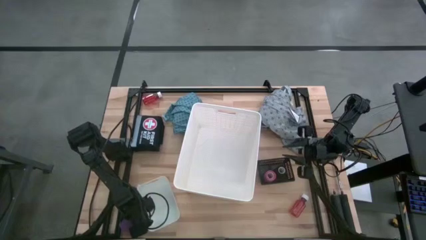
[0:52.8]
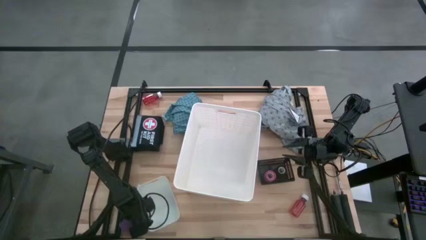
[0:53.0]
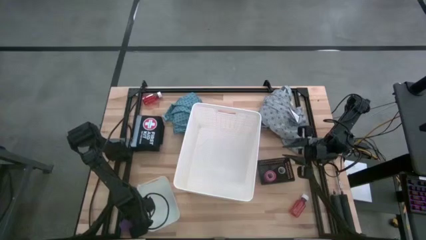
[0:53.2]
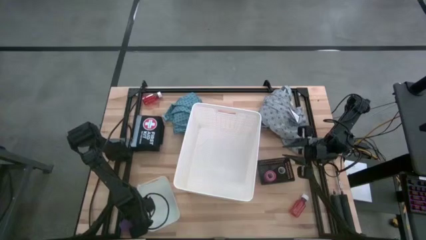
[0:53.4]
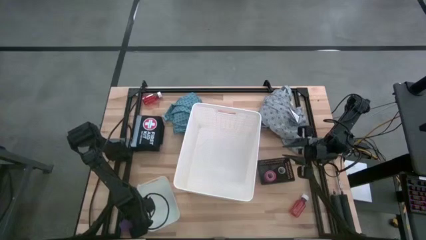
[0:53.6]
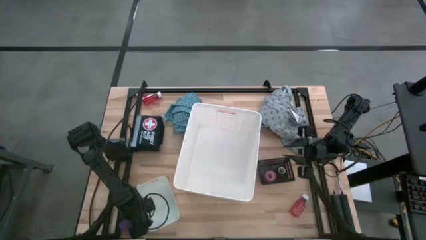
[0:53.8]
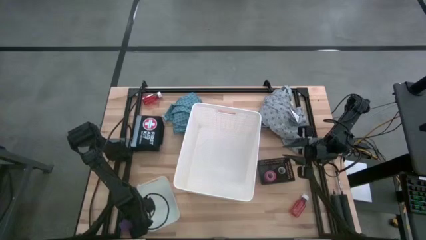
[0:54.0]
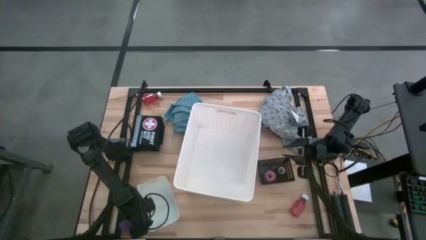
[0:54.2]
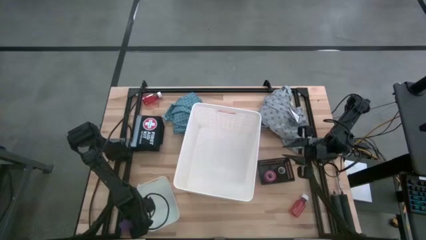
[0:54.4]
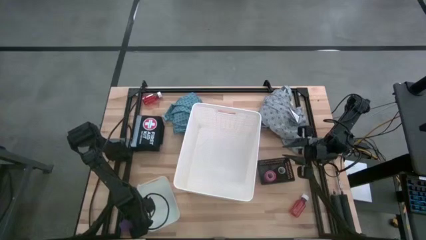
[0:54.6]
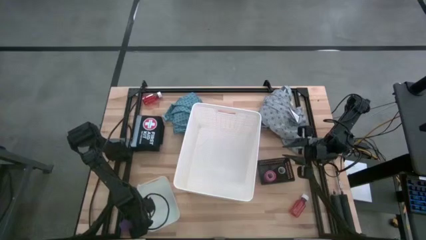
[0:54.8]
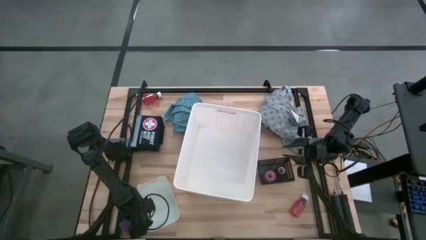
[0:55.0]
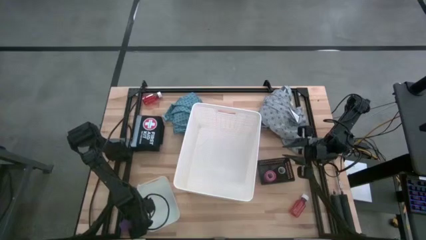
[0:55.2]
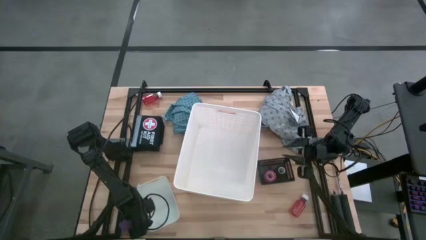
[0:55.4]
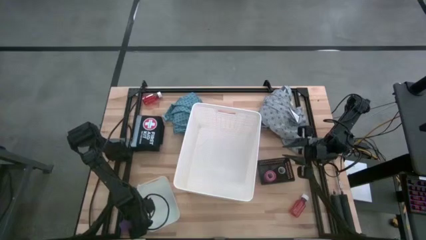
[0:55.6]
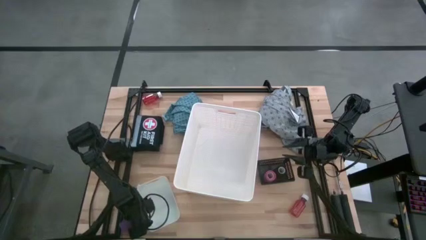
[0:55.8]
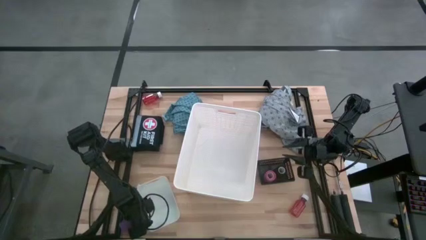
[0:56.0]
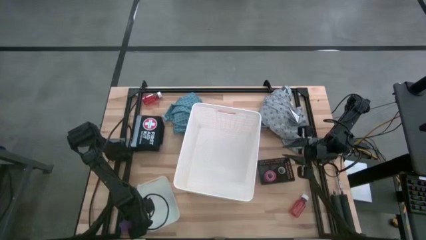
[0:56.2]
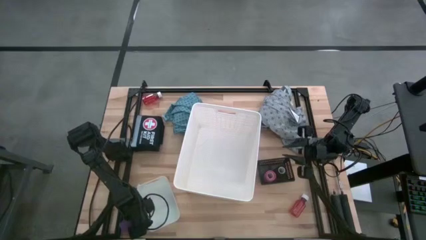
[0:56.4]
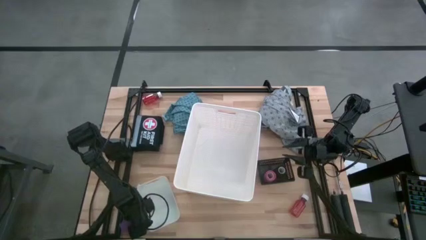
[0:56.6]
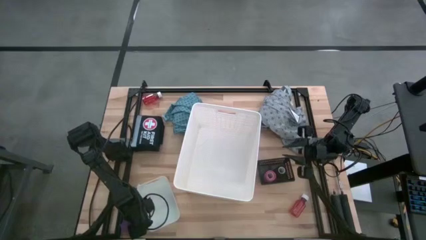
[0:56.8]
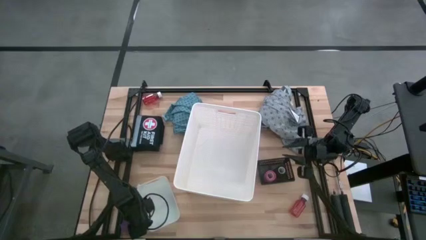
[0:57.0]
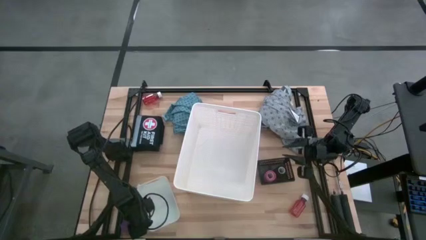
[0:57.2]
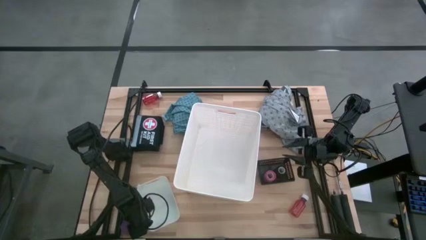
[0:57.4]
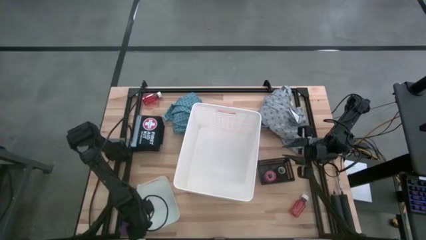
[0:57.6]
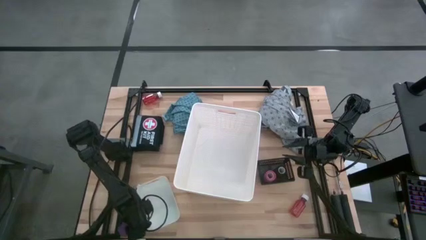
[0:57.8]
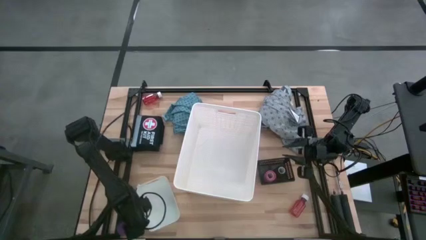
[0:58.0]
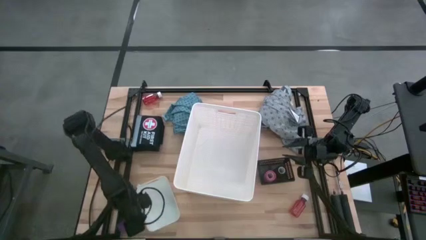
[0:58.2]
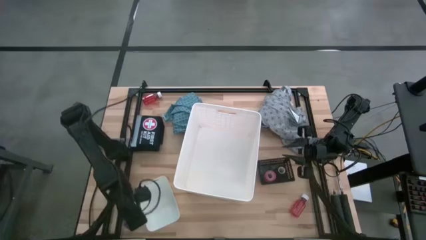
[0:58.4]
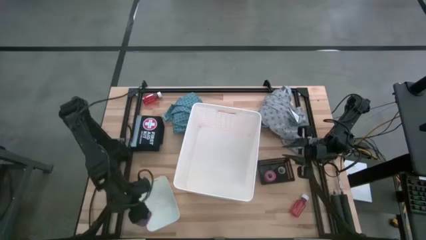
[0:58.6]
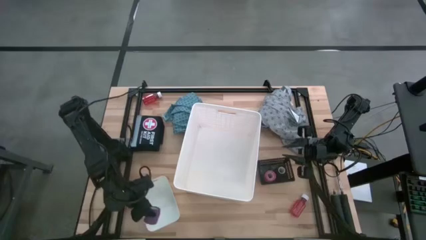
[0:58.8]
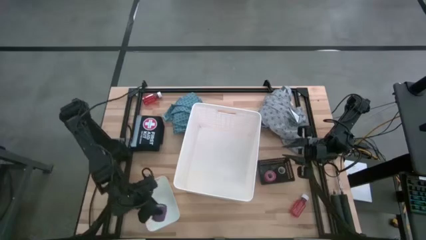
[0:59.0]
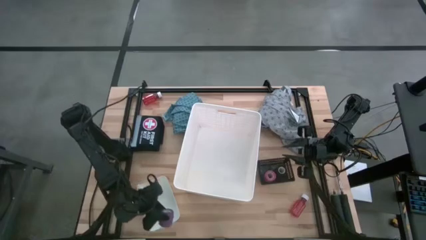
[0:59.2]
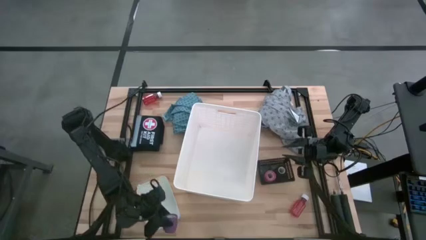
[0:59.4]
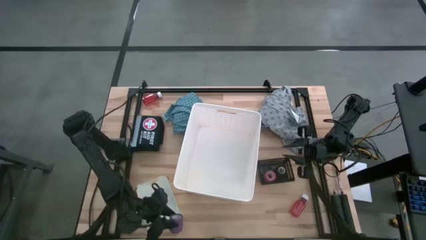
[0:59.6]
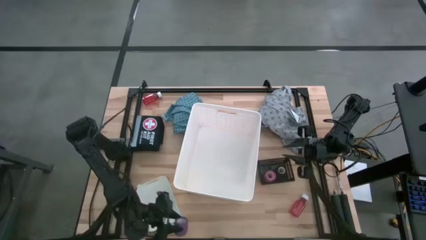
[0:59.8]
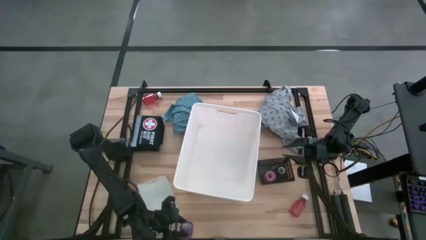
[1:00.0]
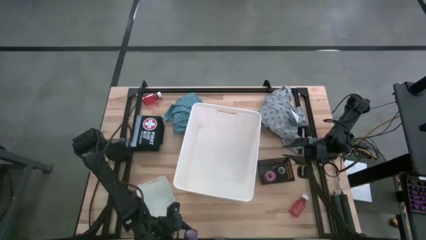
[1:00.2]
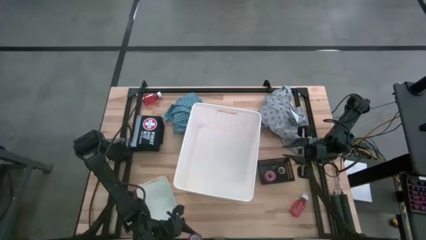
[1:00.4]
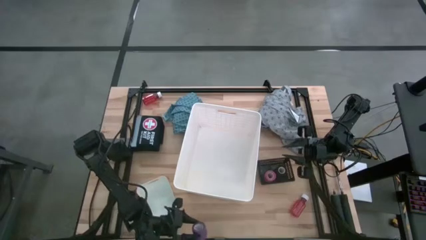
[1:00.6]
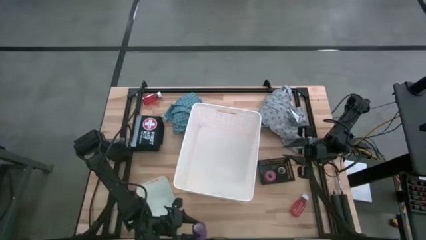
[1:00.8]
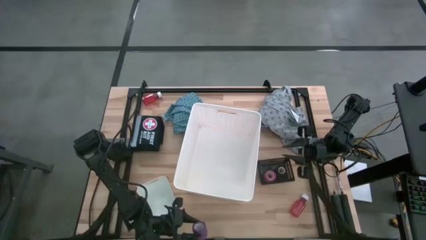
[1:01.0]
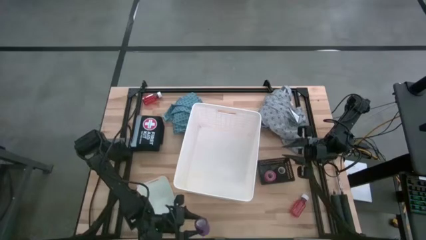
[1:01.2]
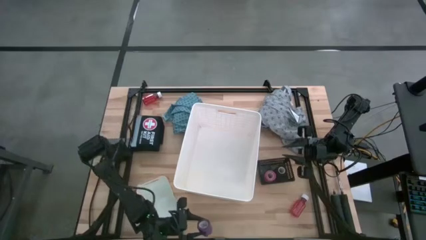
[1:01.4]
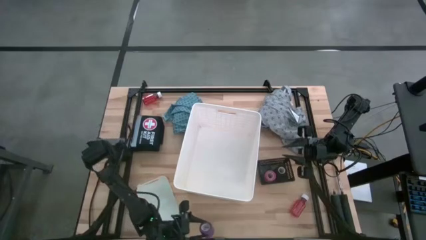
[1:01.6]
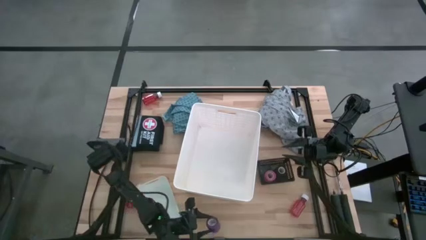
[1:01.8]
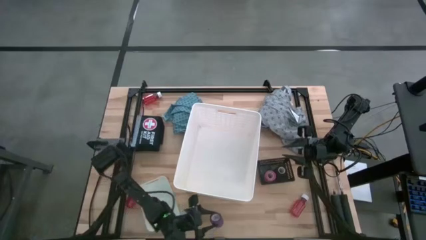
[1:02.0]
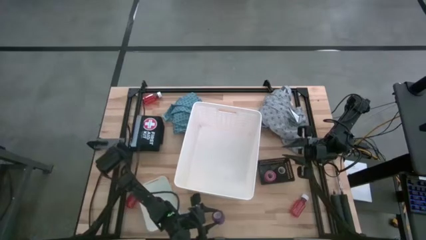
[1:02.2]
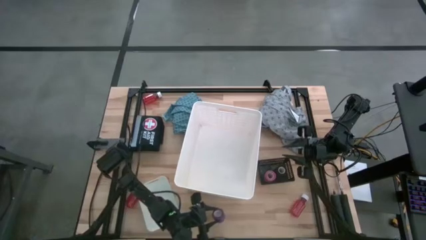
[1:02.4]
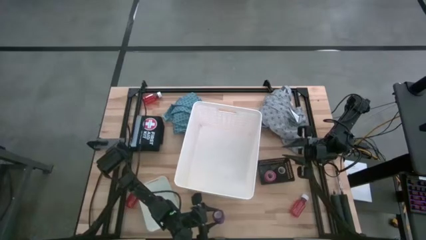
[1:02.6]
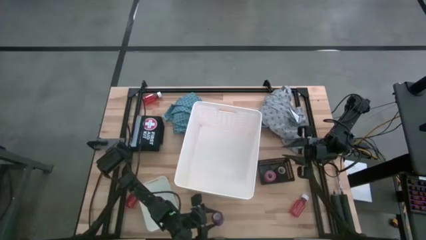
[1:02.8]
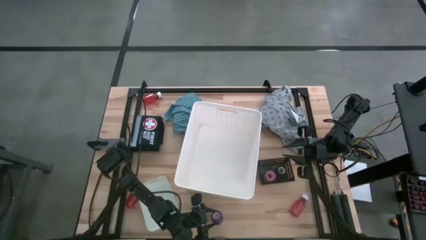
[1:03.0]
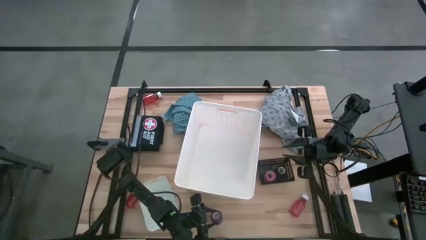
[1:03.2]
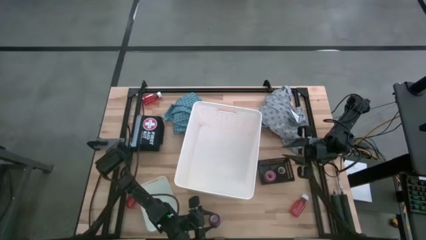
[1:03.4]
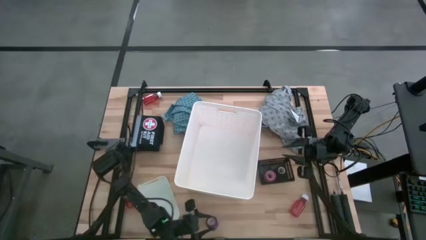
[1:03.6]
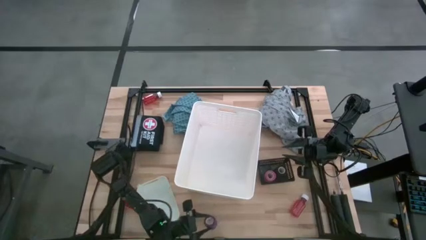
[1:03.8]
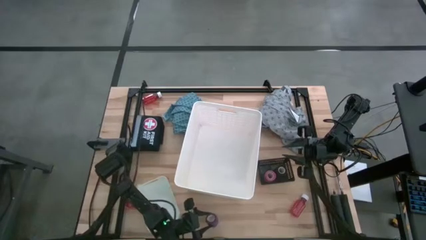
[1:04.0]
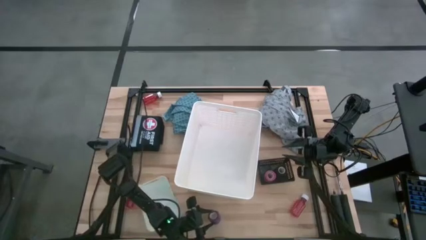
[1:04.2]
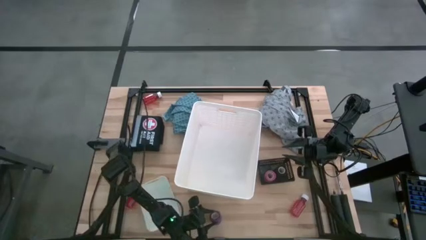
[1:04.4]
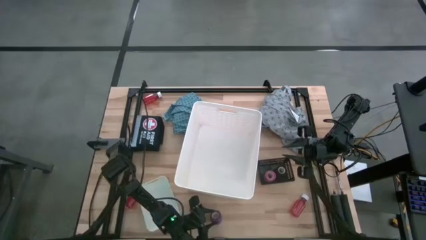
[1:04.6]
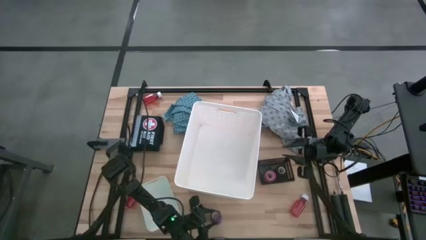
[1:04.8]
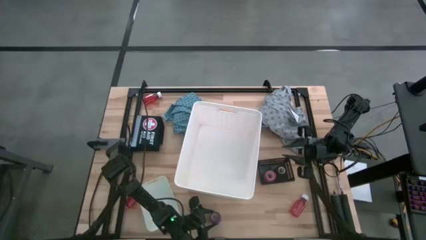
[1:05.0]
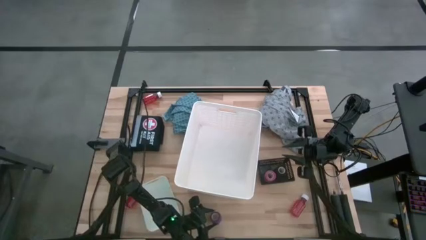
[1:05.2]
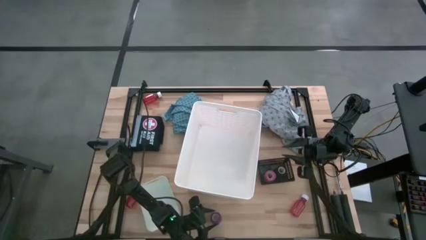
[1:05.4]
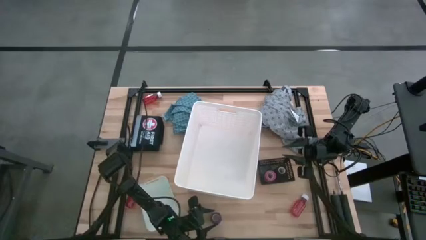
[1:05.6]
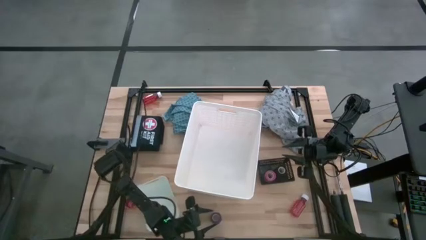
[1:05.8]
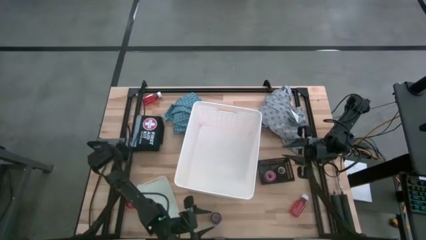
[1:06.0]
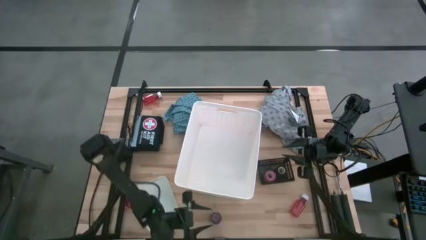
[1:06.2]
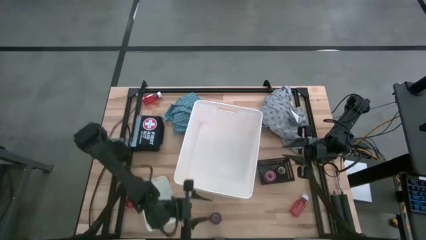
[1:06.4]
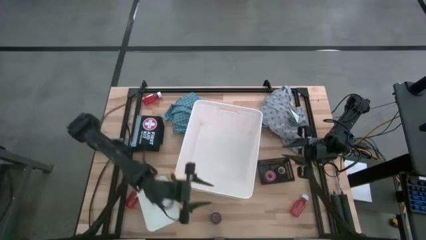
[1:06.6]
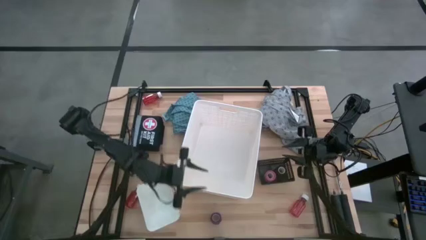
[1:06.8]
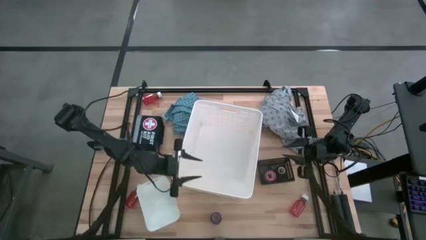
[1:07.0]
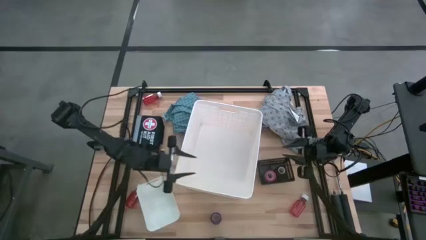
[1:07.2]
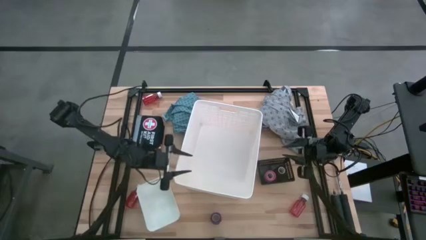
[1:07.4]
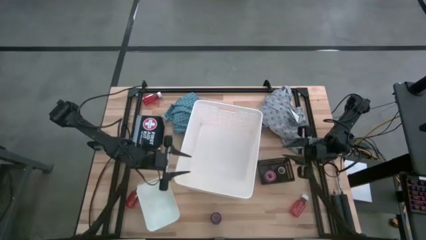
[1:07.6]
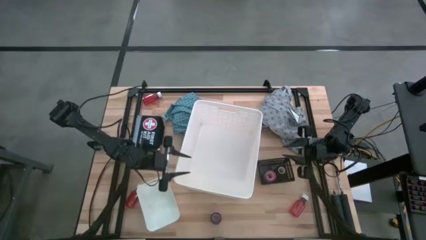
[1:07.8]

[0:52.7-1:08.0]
Task: Pick & place medical supplies in basket/bin
Put the violet bandage into the black bin
